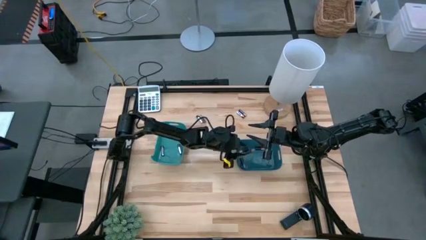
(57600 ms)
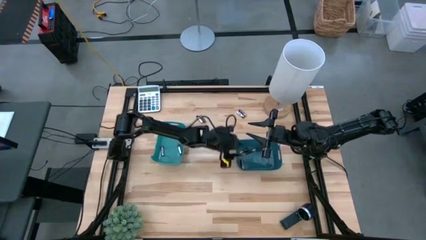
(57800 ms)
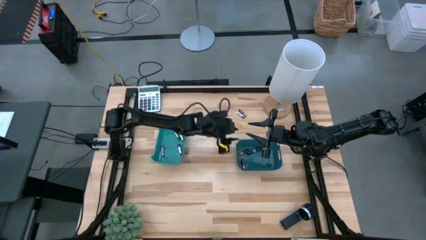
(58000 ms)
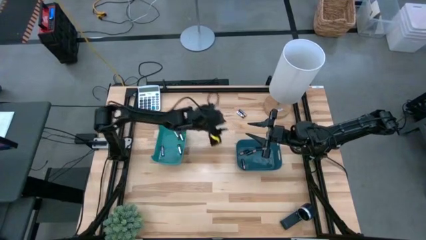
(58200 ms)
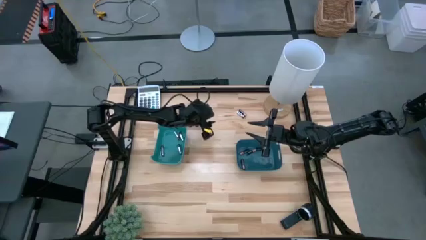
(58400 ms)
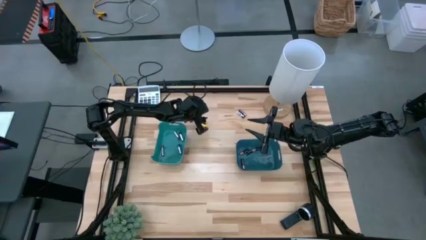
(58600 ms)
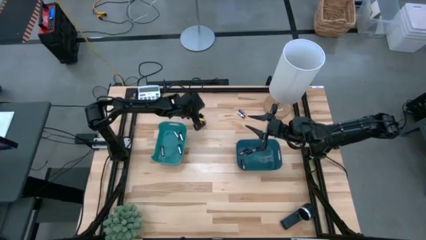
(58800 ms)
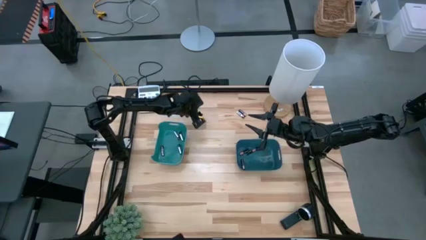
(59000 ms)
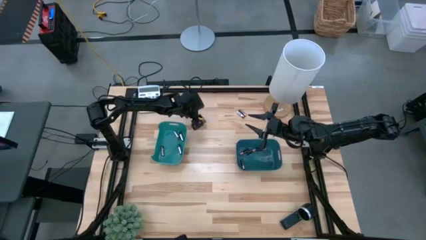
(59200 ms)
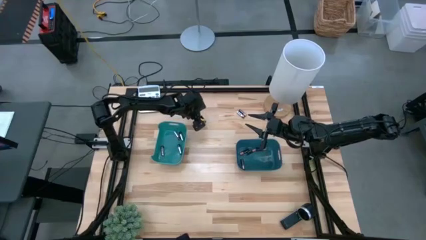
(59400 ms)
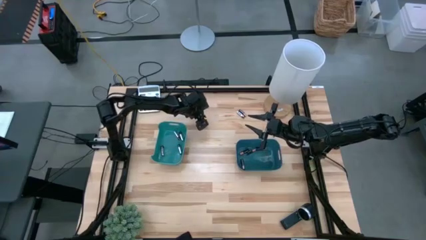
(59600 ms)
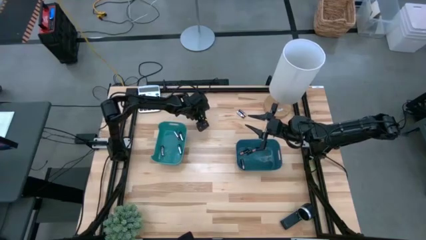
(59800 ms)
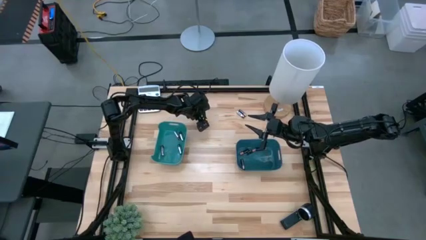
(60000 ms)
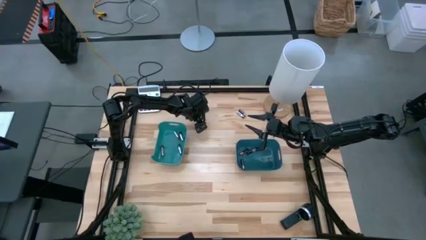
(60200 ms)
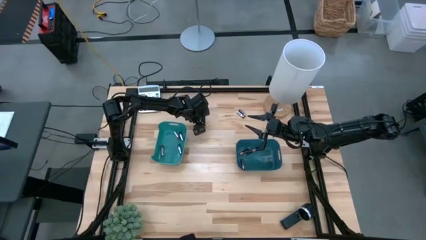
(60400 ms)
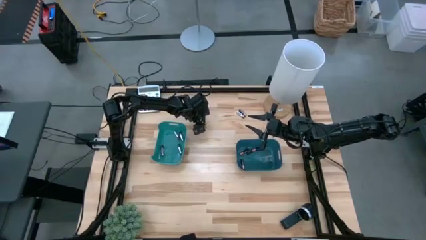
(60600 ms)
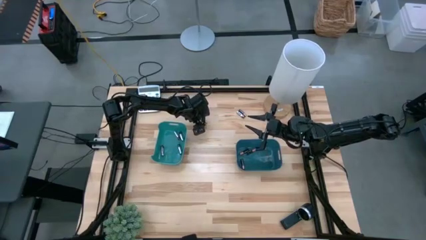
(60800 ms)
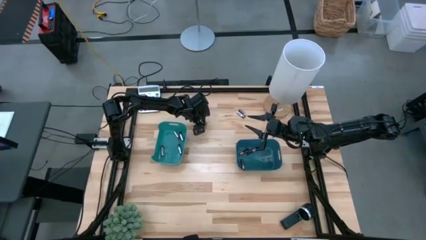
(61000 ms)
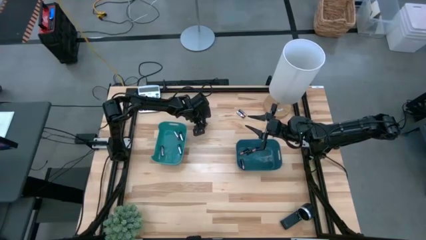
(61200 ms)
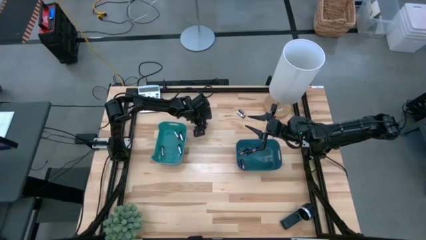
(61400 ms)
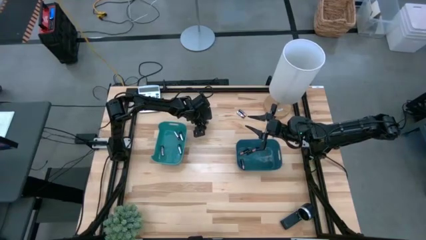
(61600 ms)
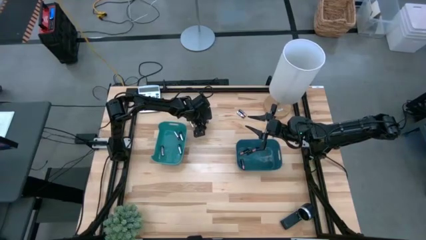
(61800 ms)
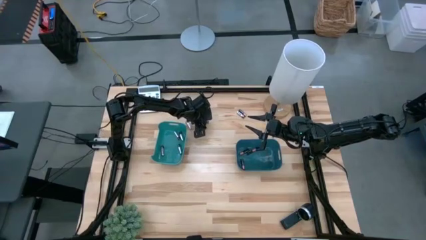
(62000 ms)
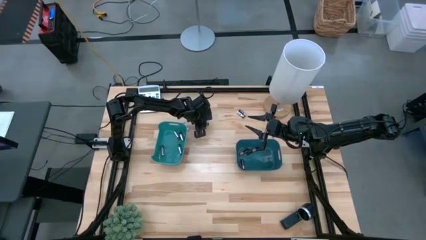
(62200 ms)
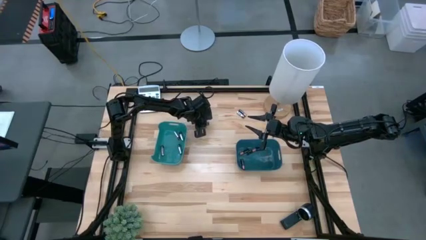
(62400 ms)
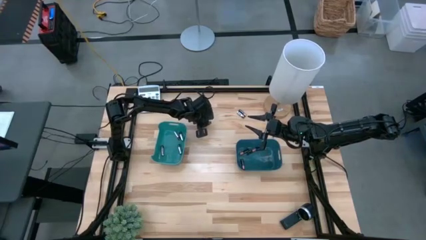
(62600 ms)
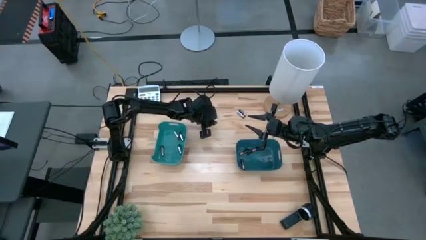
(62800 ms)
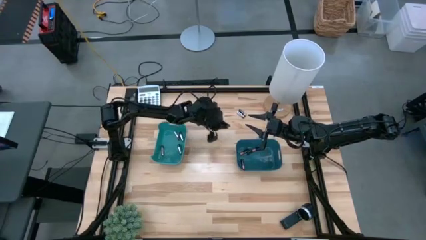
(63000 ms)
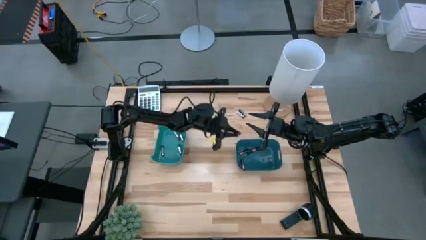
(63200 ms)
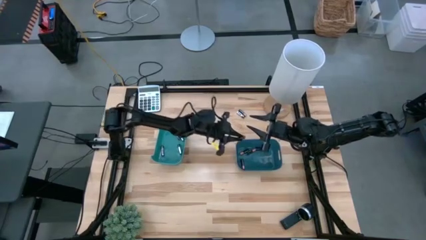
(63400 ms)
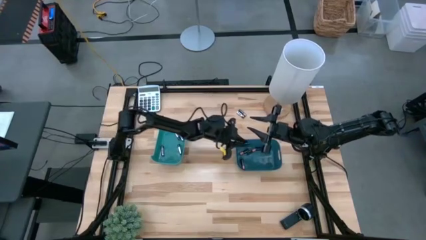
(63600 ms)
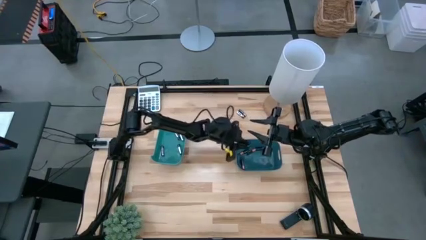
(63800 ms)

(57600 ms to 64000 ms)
Task: Sort batteries
Put the black battery into the dark blue bin

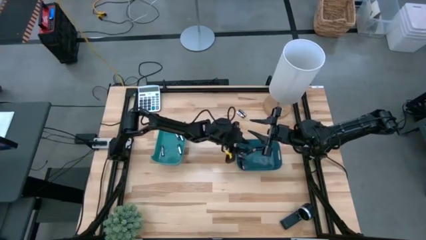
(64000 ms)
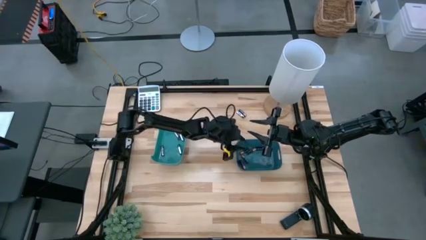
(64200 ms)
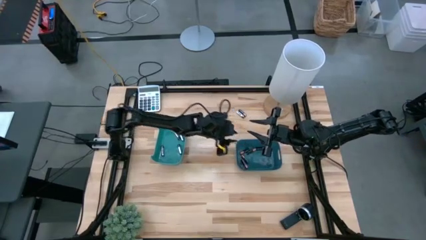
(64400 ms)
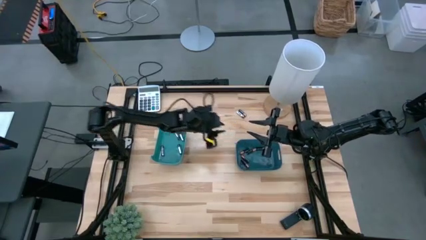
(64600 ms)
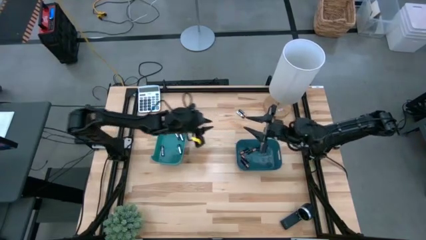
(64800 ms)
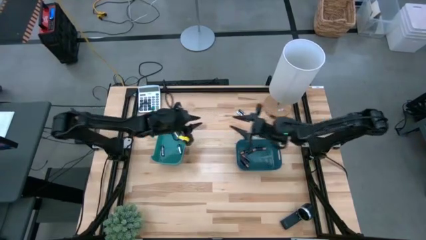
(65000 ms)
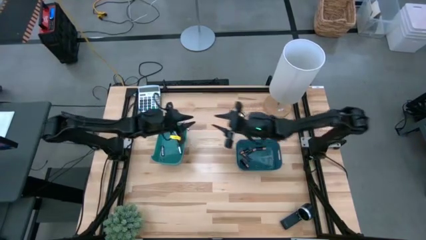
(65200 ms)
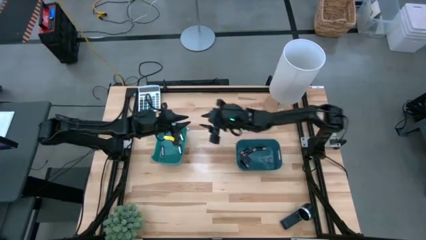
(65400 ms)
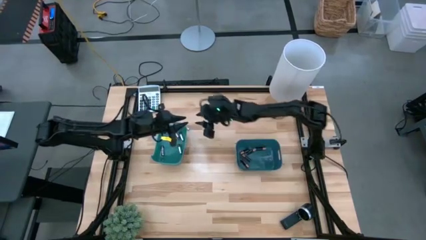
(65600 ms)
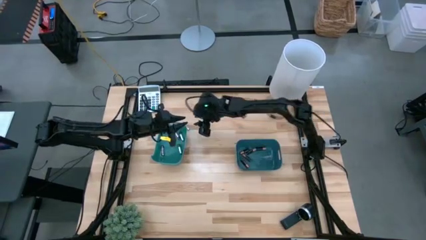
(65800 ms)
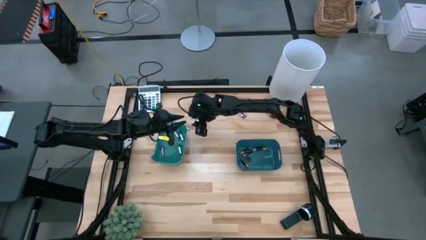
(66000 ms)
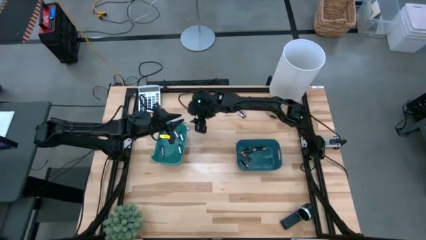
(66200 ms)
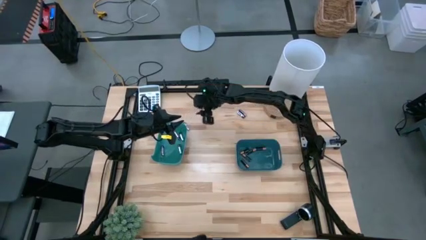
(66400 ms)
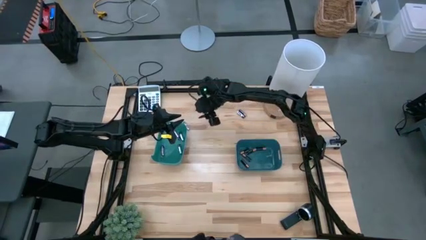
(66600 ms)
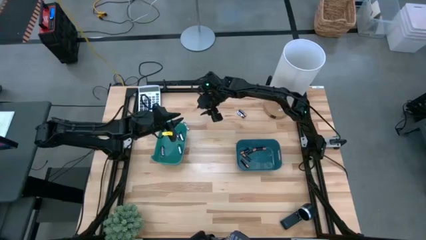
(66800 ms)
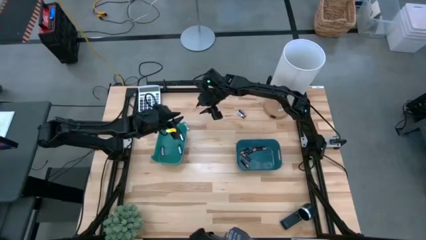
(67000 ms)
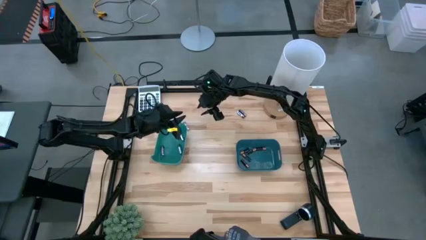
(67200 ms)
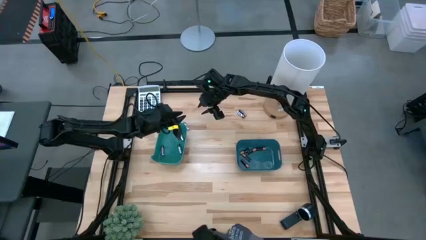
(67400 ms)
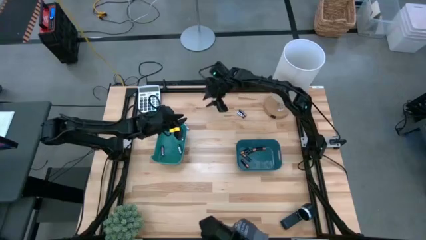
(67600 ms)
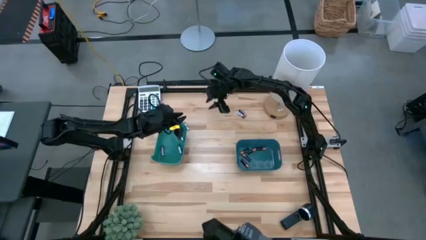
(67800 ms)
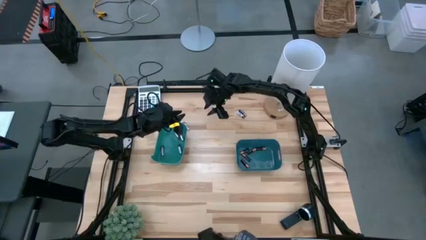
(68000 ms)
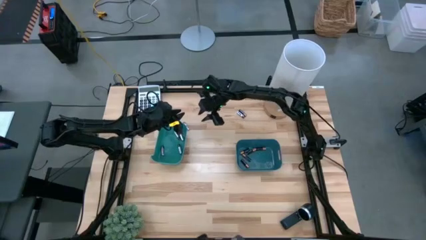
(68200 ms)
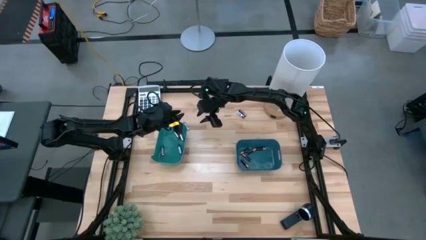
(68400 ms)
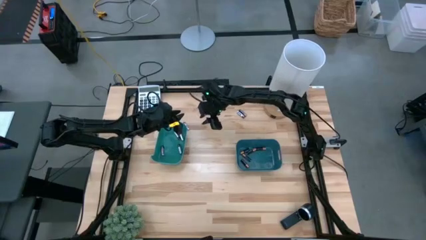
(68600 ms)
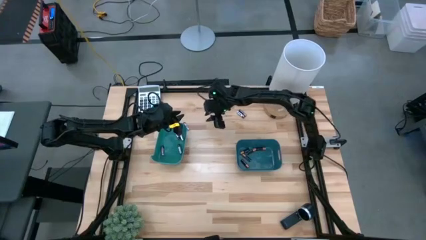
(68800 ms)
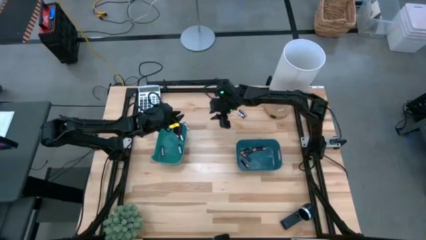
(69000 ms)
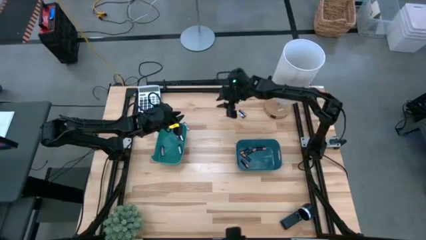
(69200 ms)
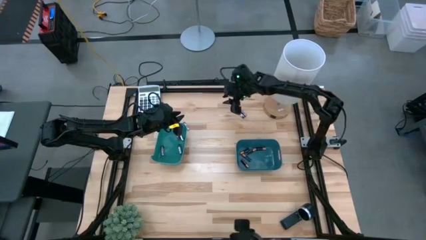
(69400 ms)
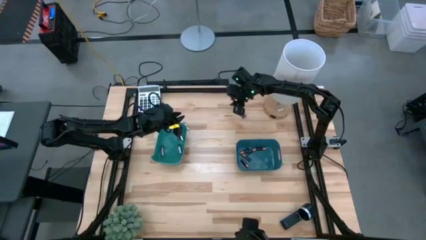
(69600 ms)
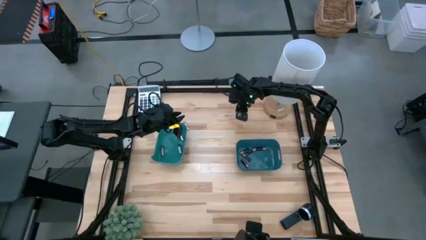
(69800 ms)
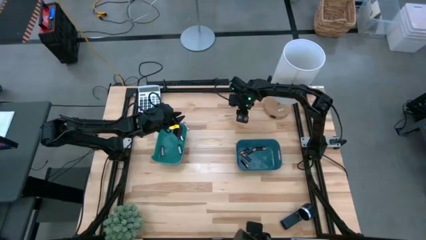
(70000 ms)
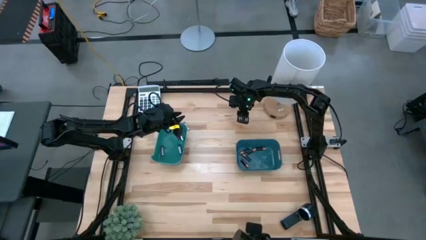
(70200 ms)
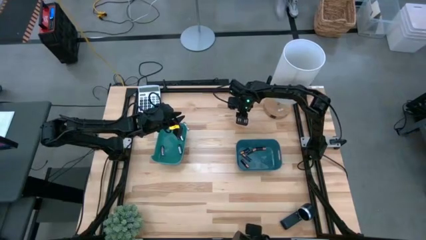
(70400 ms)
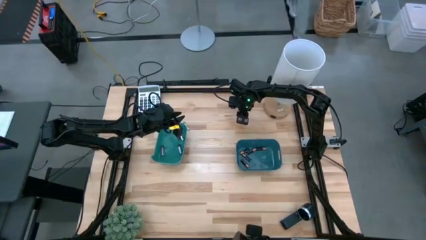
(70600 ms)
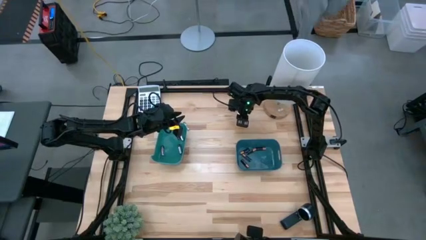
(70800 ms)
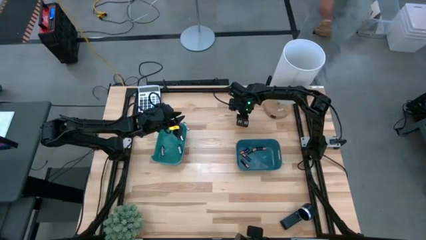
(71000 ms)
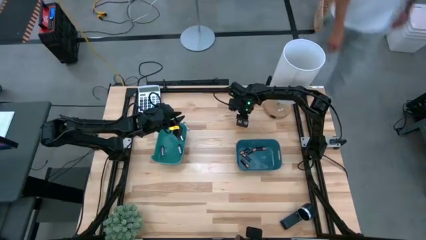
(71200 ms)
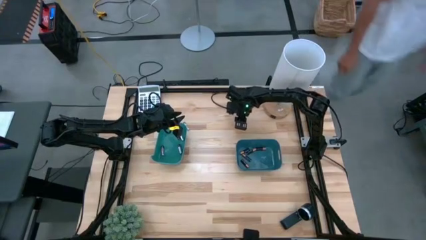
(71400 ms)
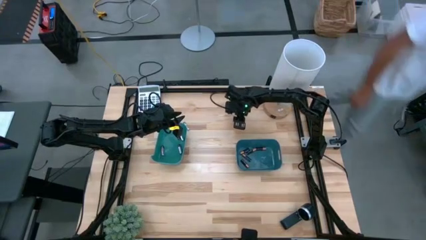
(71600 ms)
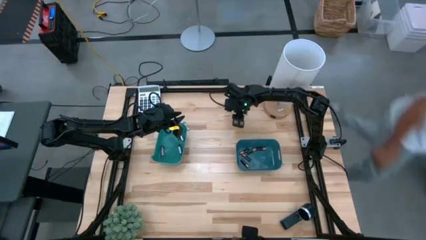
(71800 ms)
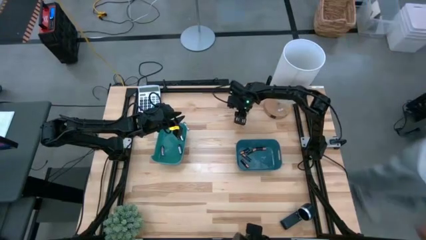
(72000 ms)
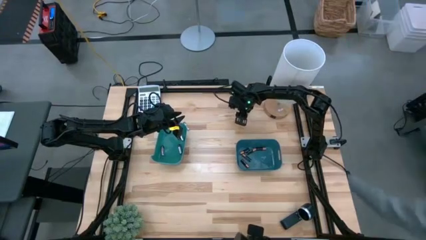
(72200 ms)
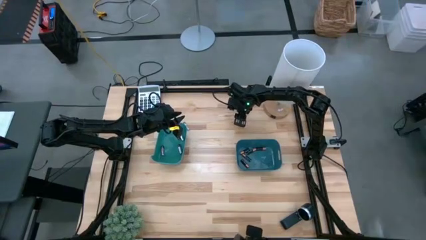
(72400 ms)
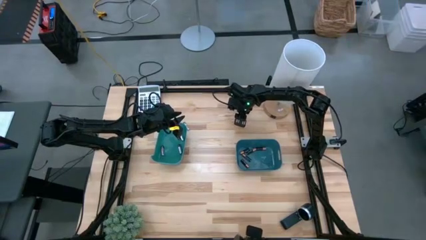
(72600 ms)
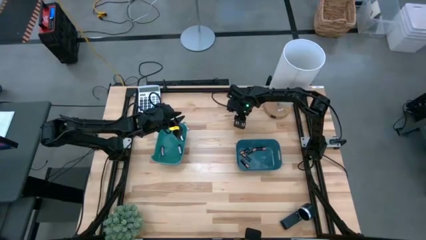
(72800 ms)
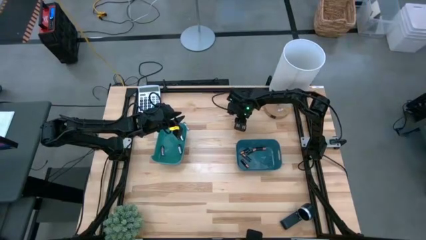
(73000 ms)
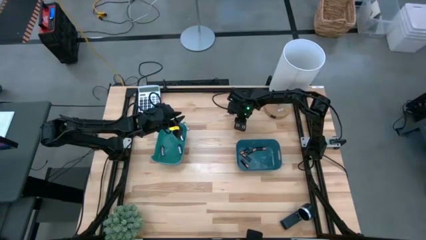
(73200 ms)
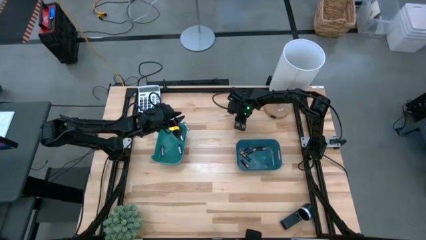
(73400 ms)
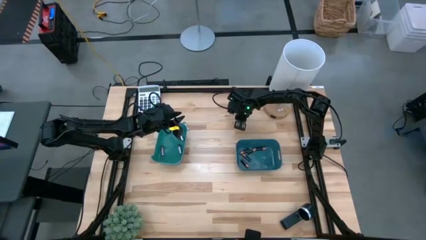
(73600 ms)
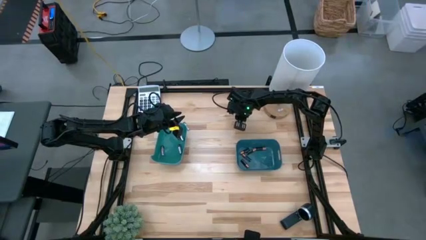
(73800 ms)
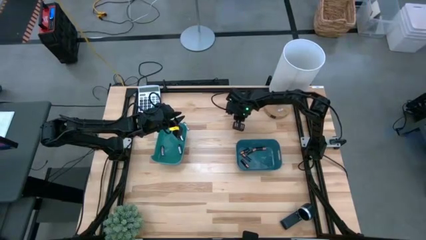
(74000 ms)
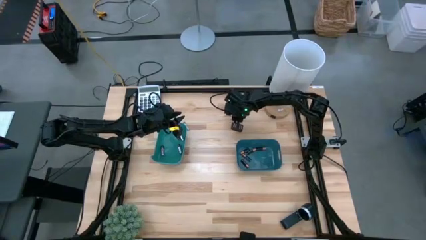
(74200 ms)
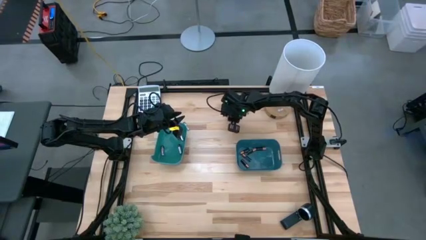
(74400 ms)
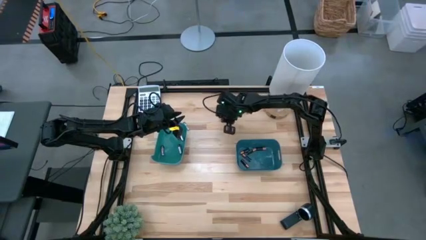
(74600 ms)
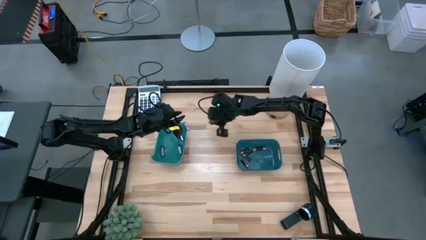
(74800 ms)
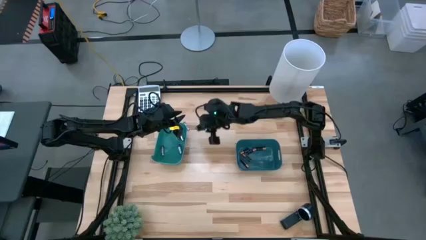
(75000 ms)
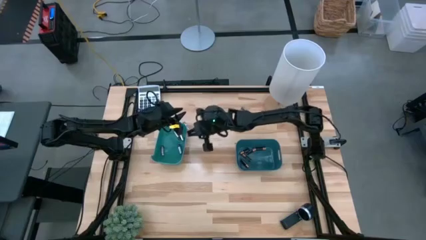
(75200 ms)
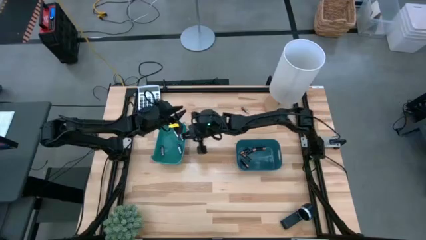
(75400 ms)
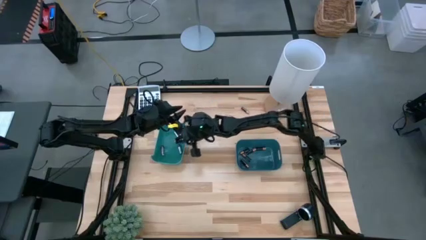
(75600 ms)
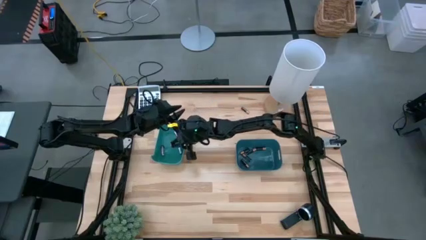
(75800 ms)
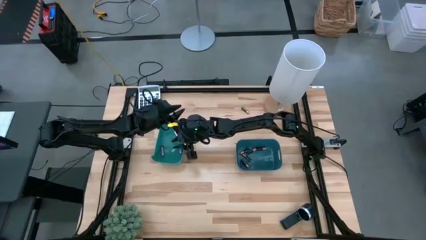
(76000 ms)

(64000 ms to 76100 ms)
Put the silver battery into the green bin
